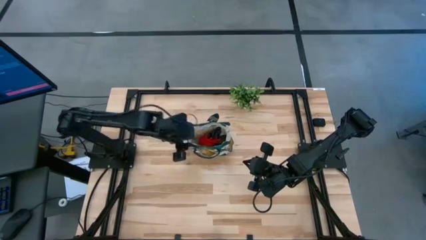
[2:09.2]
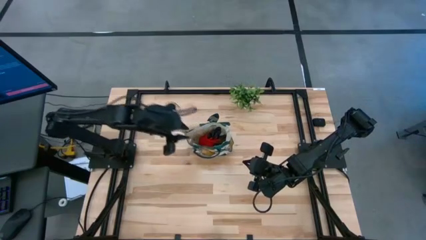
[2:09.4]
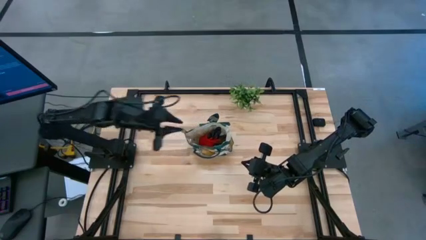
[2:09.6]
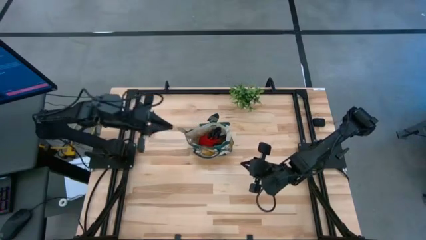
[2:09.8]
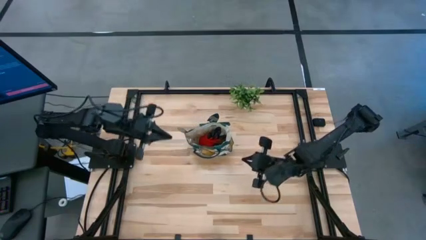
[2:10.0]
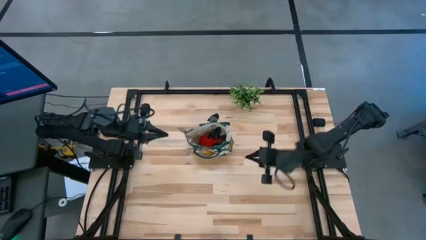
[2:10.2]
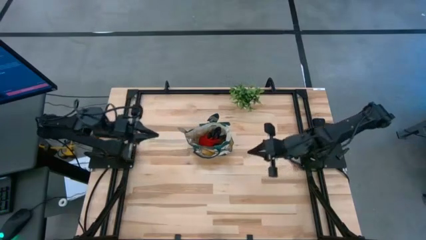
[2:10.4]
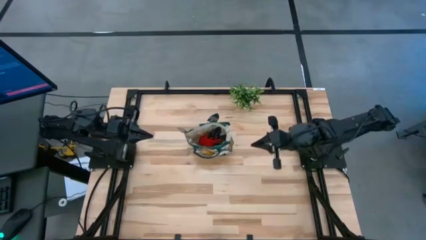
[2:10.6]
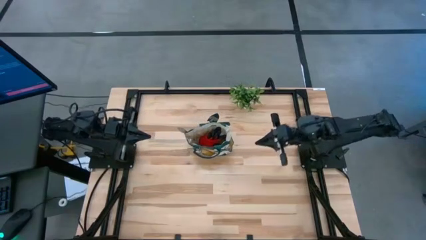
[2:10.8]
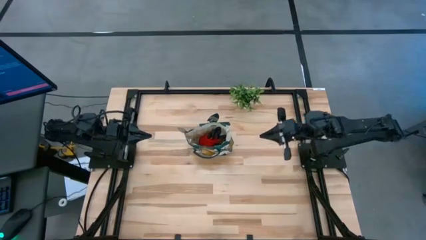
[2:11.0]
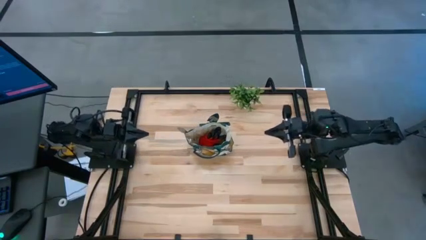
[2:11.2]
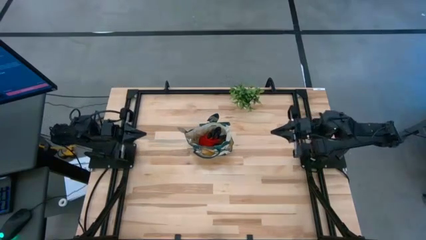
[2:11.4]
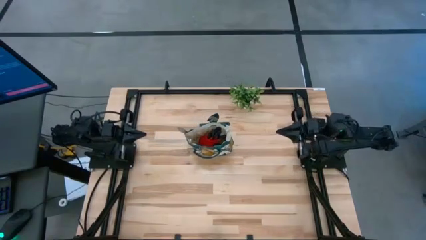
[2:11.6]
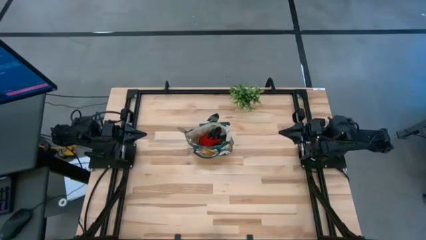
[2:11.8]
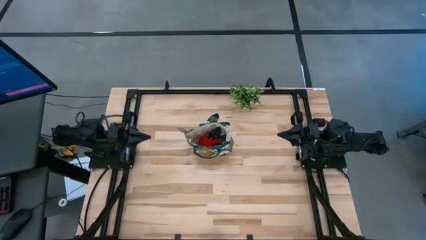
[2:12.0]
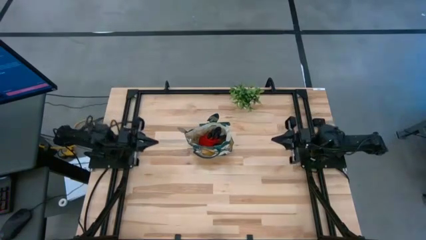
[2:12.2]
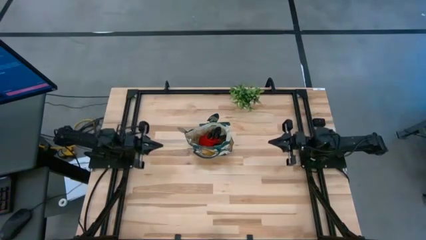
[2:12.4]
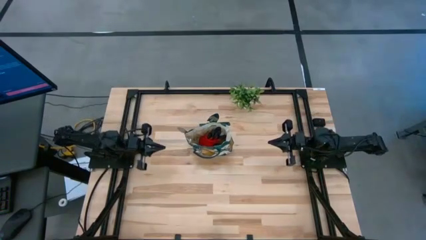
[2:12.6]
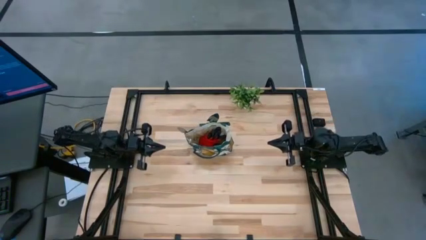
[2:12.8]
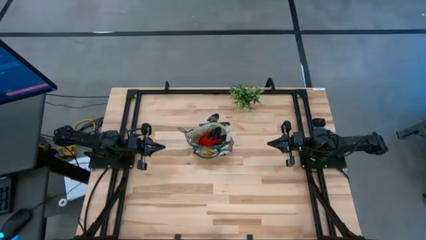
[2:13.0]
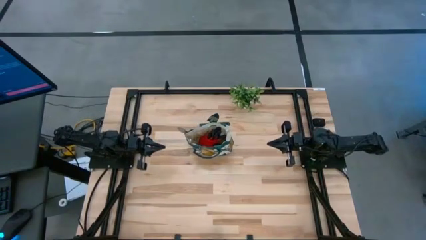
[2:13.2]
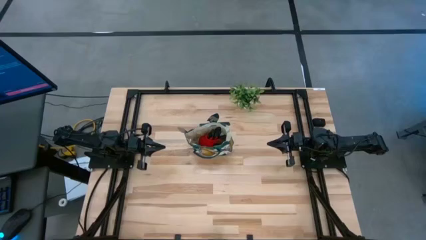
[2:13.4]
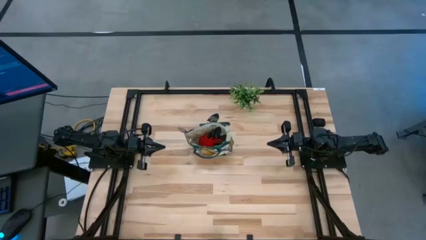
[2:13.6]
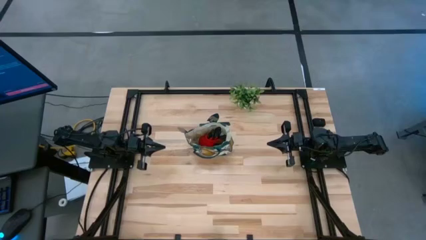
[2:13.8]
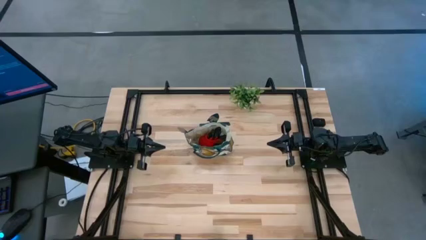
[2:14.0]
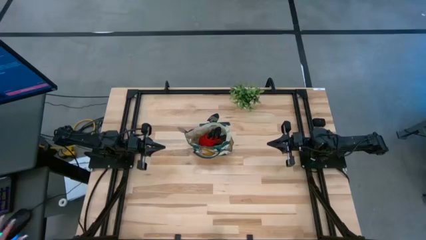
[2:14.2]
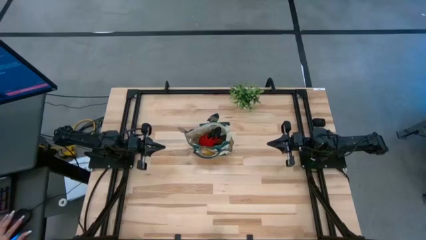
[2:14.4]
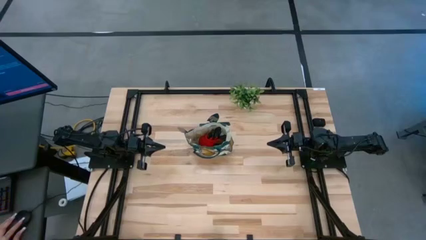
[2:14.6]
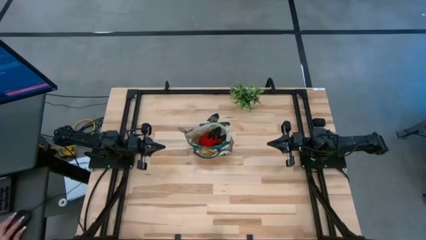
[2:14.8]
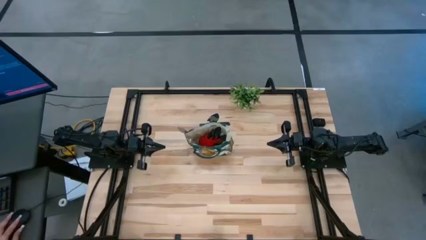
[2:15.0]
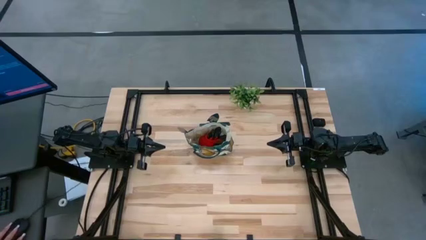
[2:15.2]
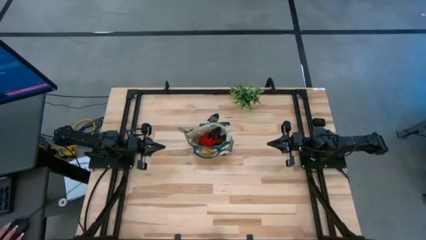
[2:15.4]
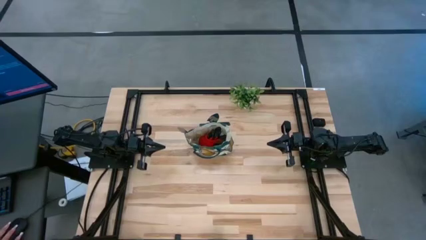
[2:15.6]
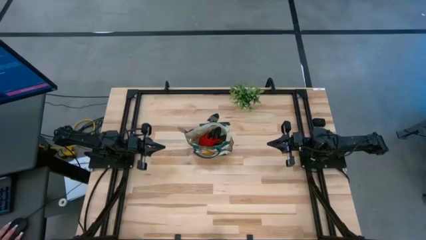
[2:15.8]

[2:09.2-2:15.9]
Task: Pick & Place Garden tools in Gardening bag
Return to Home Position

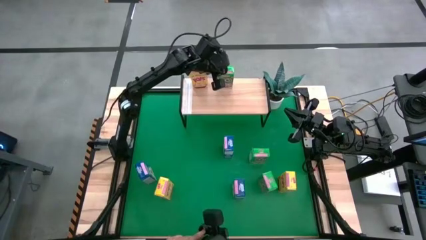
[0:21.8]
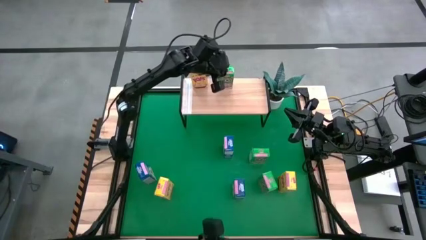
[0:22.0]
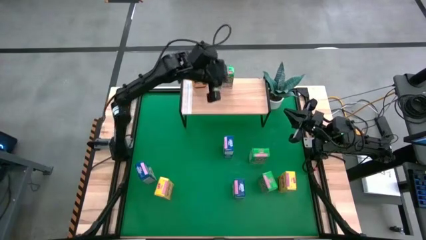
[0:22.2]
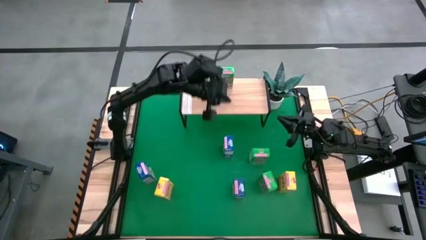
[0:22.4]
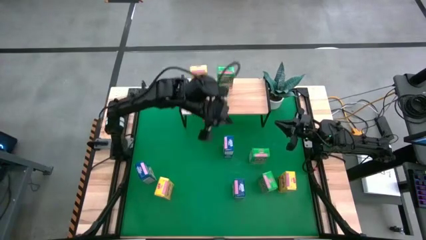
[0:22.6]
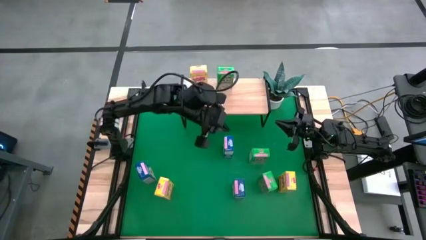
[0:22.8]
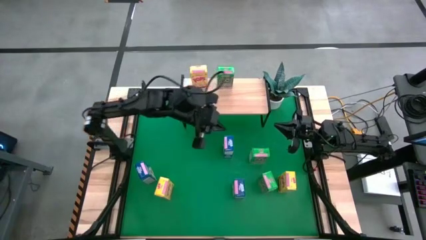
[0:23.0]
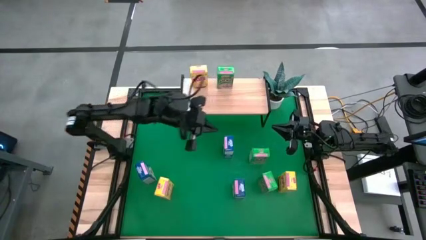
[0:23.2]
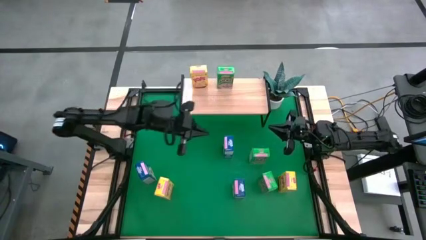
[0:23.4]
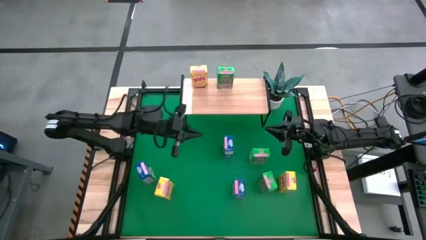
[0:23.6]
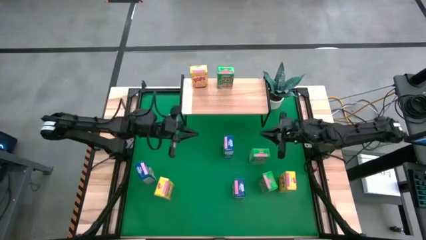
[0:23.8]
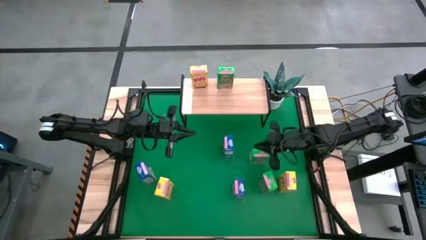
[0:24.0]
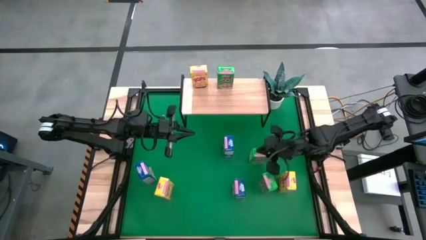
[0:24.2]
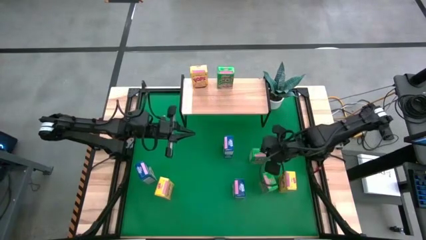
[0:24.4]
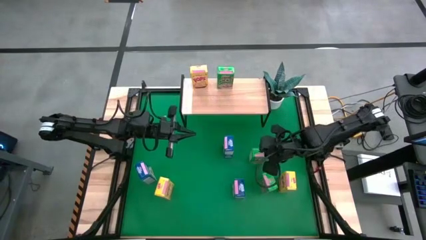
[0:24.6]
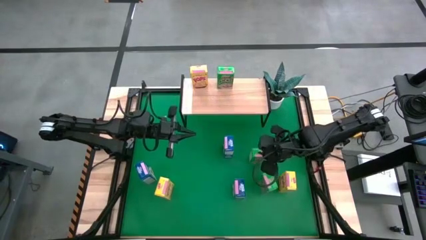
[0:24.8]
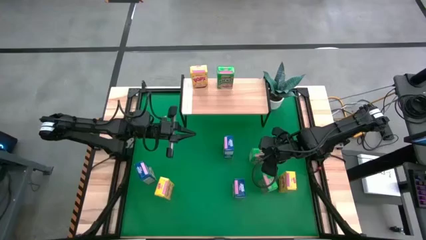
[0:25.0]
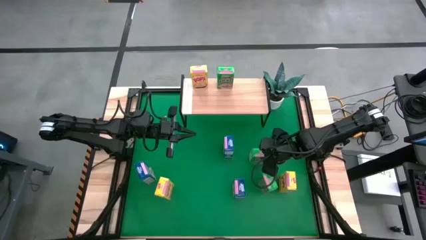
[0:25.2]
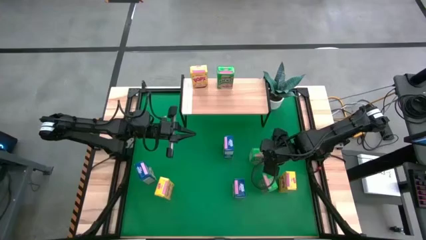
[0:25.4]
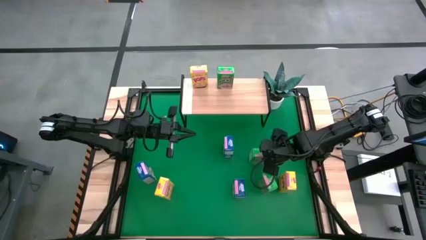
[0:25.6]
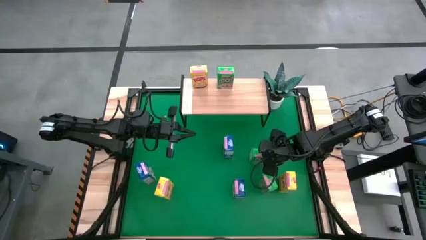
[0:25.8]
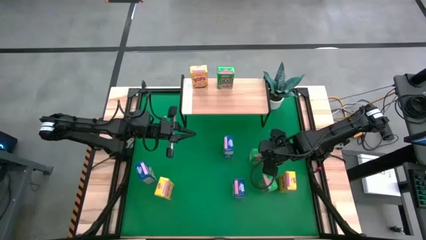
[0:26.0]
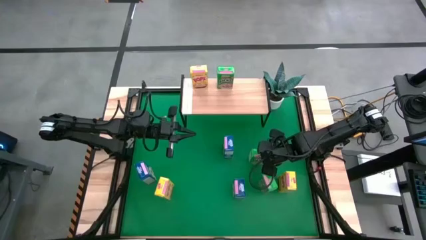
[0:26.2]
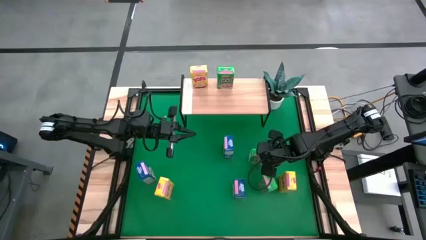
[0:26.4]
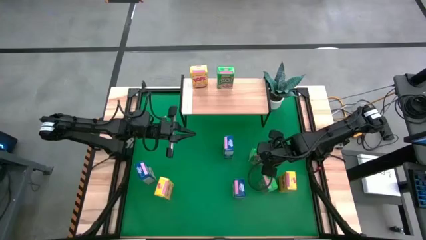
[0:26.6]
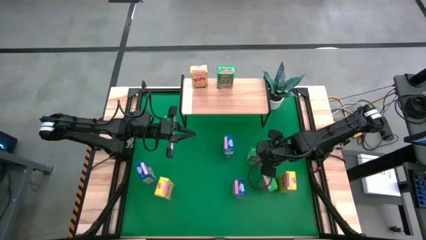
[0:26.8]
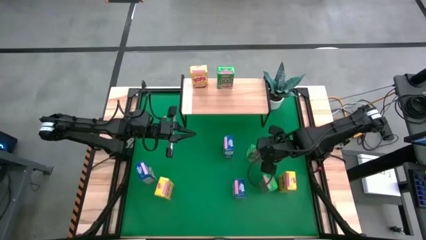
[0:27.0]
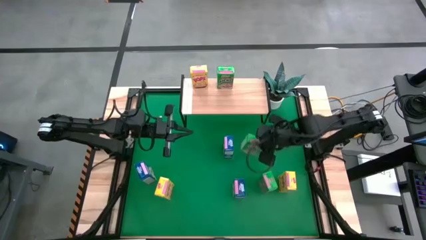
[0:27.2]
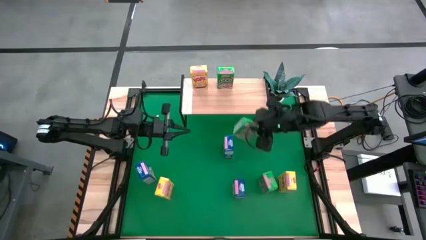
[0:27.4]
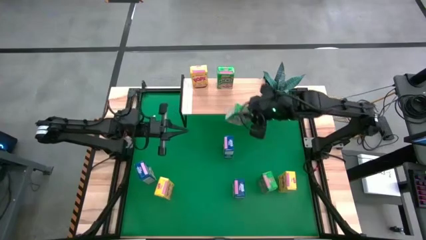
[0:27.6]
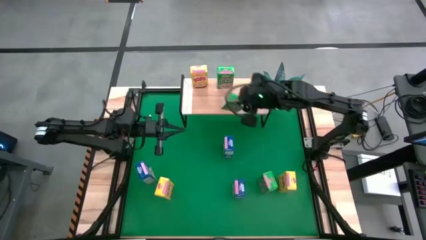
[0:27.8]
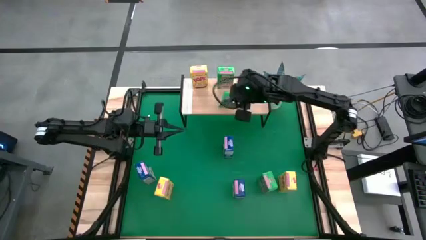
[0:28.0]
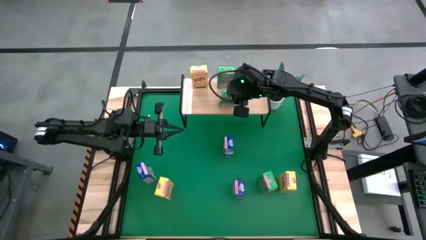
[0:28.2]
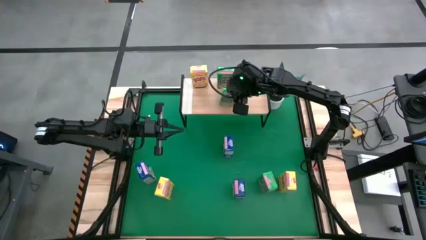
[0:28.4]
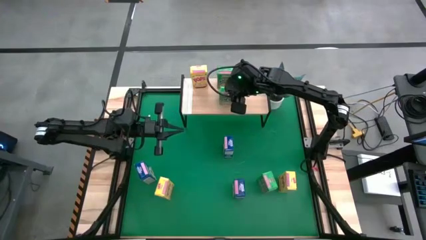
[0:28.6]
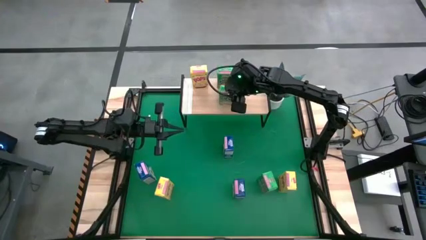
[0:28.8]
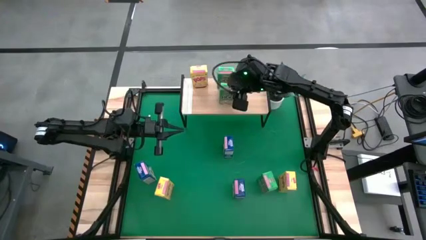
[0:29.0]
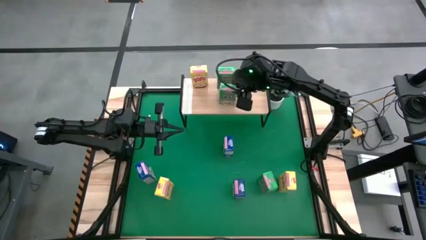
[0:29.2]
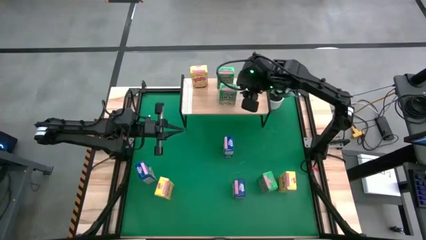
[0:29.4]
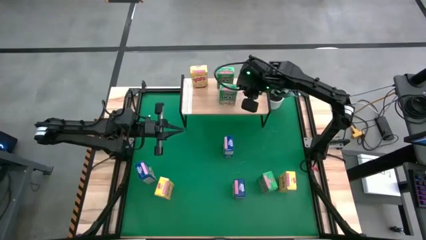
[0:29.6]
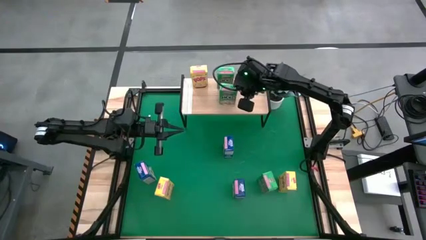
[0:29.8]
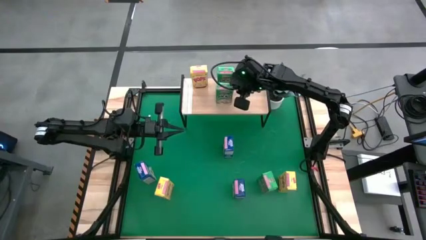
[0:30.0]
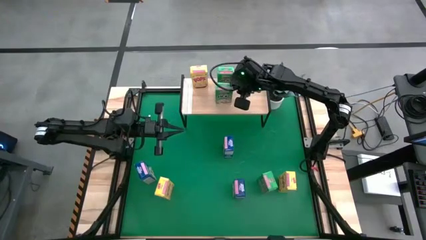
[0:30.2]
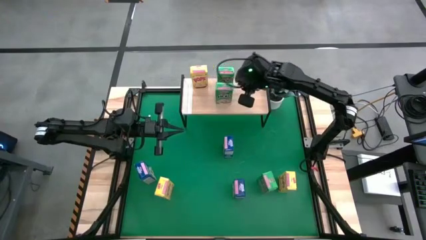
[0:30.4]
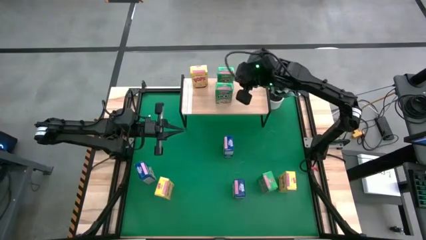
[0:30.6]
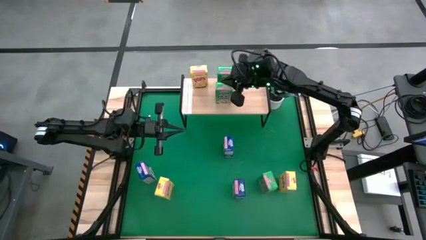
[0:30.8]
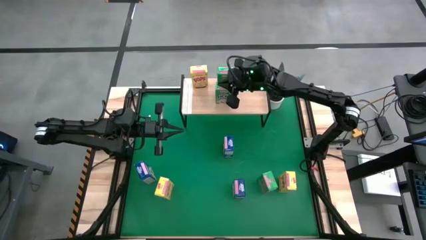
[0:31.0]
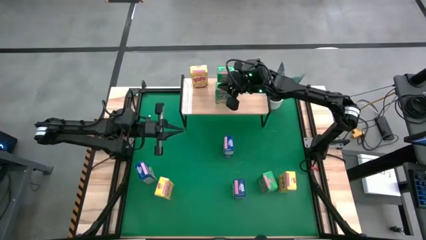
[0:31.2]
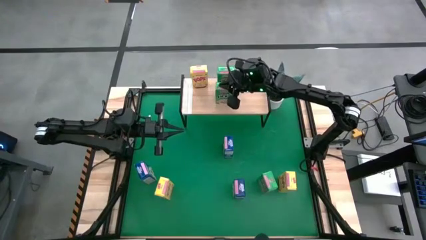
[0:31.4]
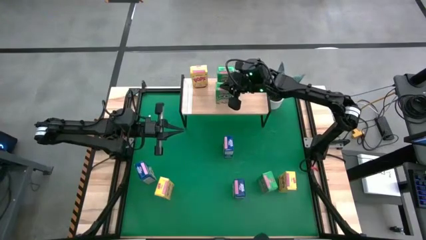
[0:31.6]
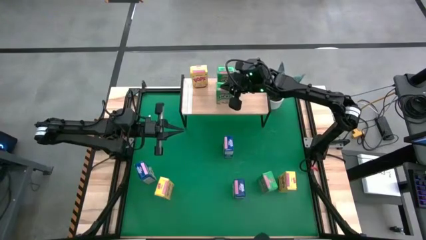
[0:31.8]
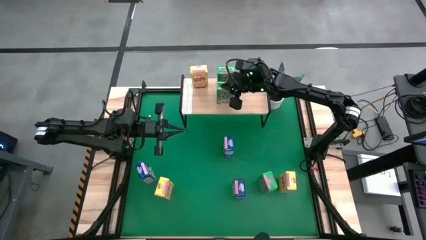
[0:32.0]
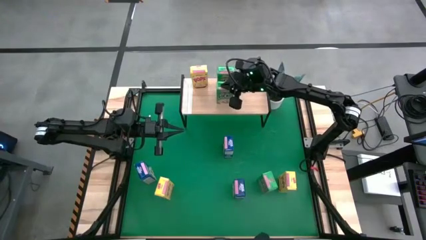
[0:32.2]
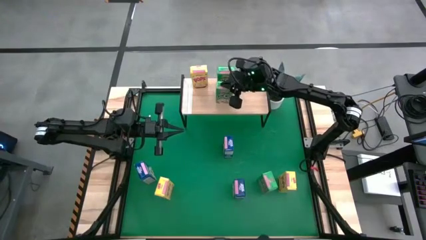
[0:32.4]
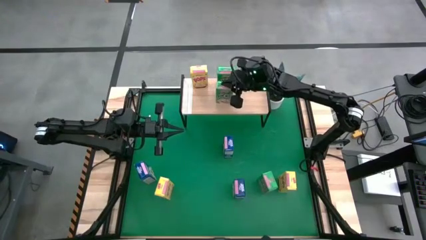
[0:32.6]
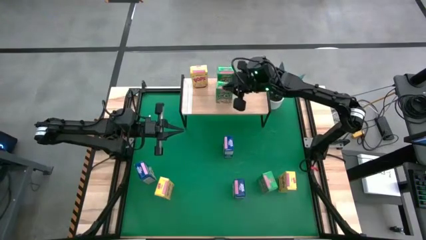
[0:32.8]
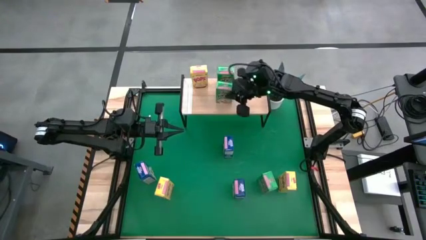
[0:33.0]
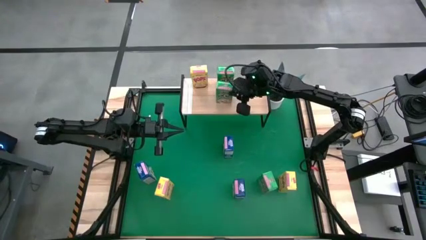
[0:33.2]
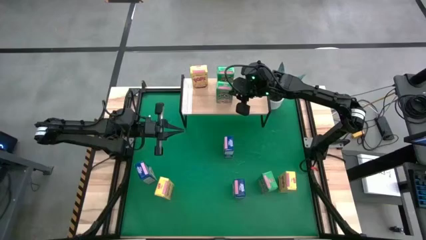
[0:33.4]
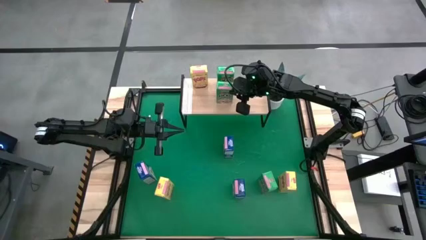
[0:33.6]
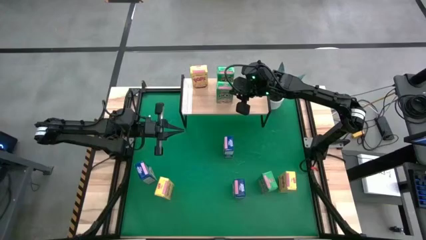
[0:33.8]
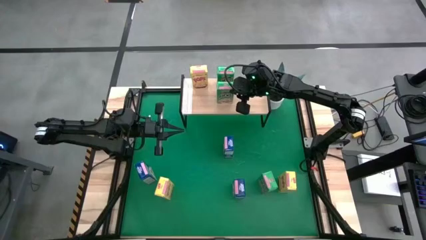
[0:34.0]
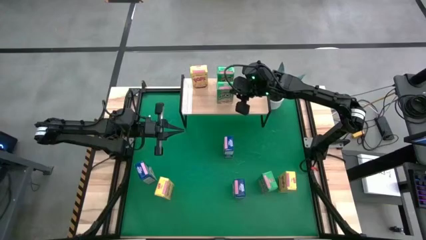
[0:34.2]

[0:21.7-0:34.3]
Task: Stack cereal on shelf
Put the top green cereal box on the shelf aligned with the other green cereal box
